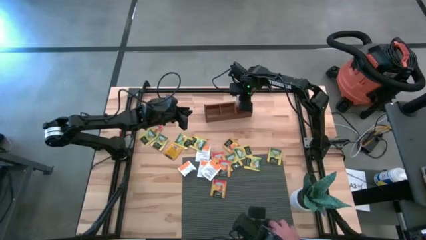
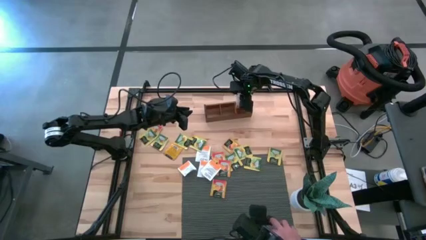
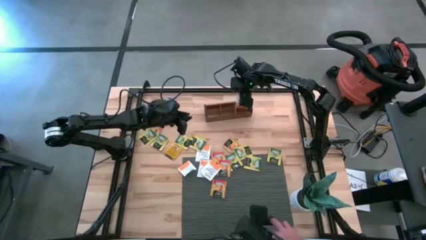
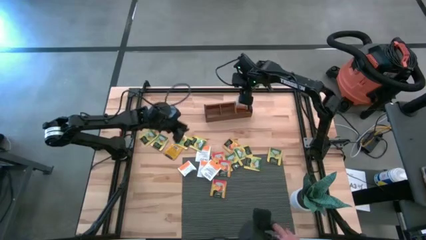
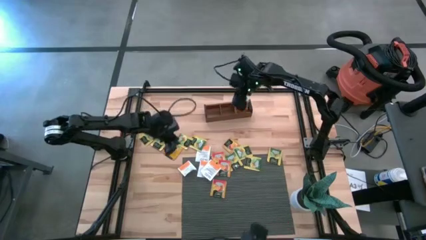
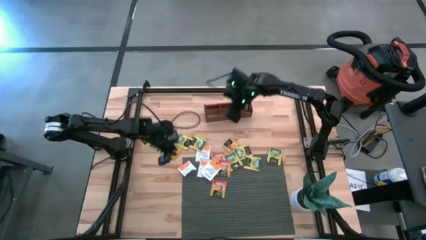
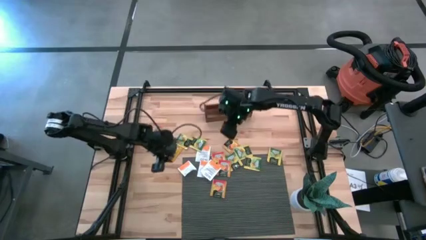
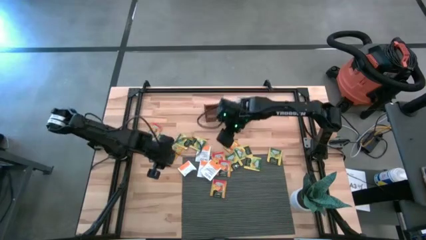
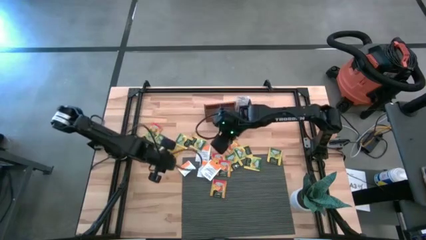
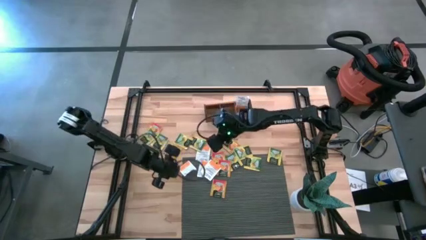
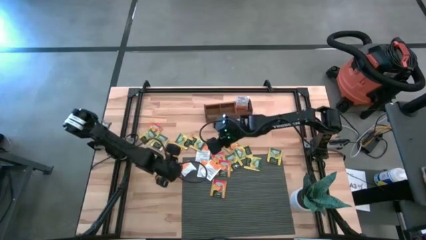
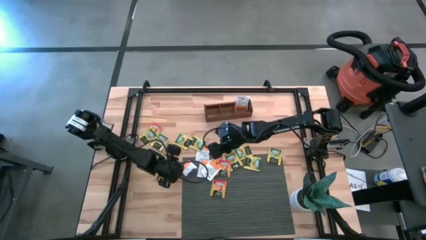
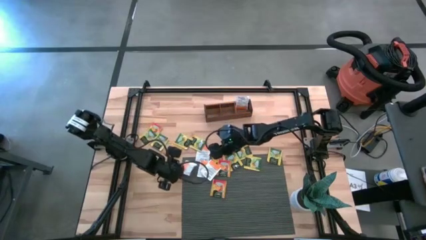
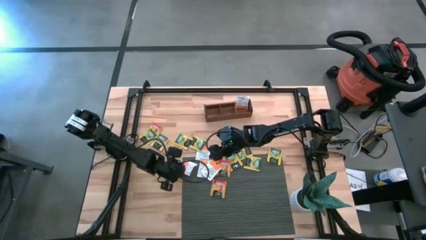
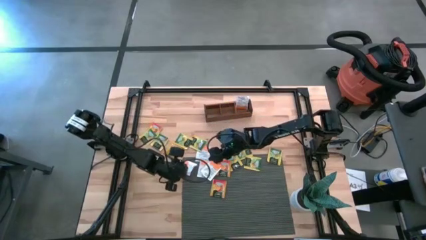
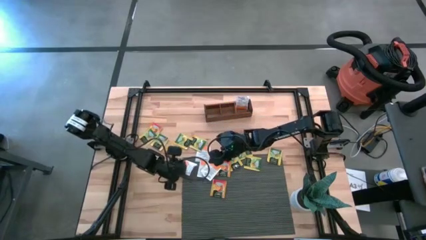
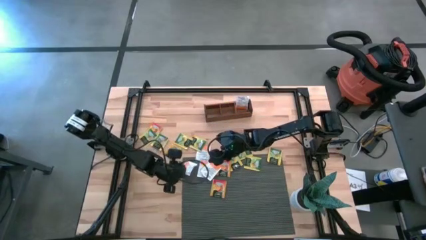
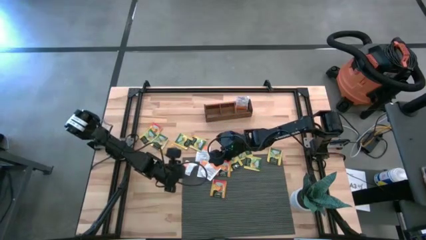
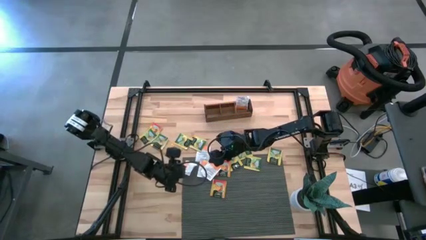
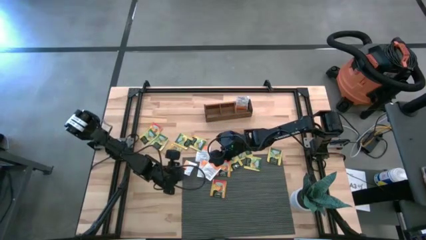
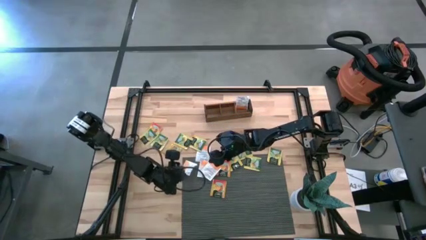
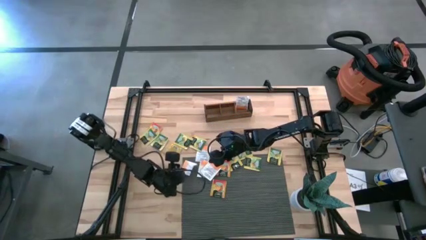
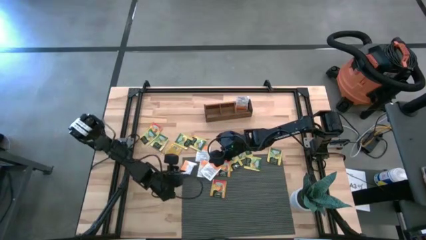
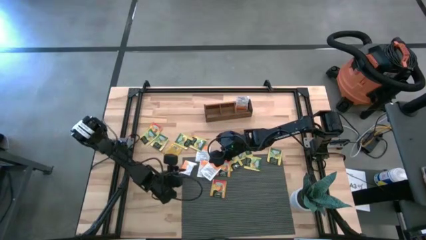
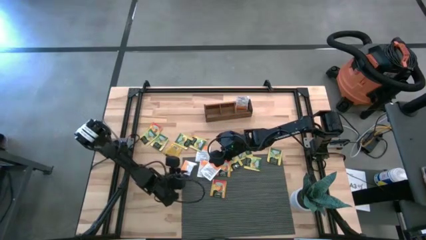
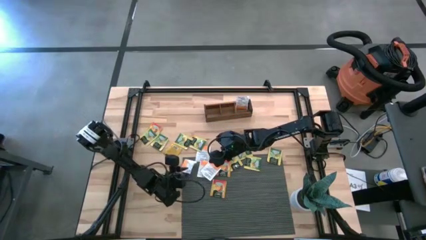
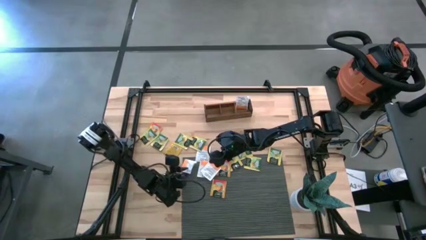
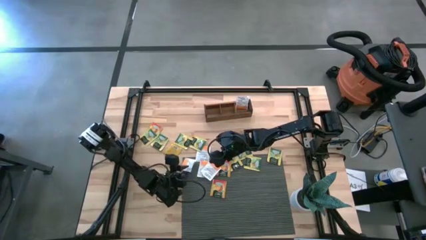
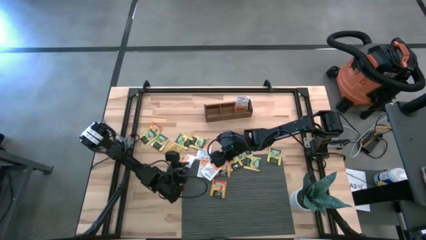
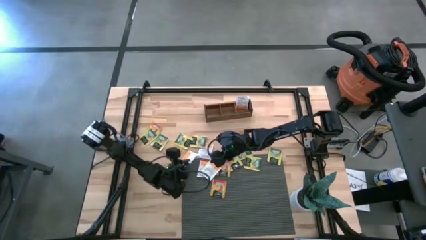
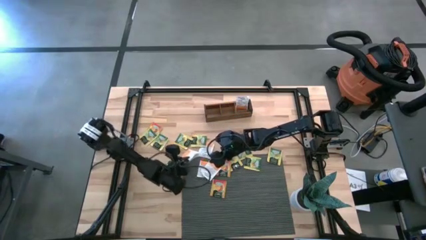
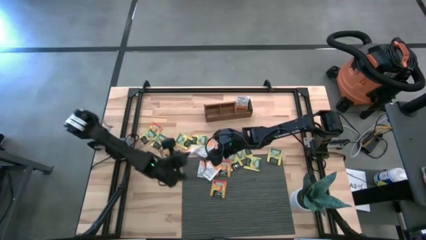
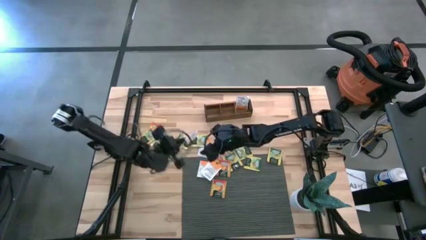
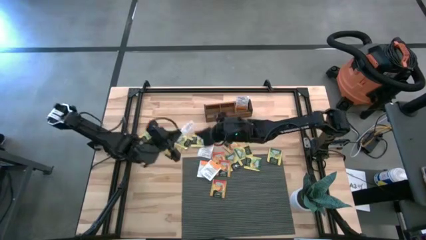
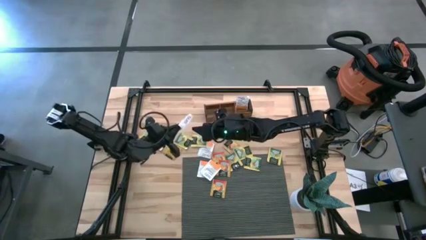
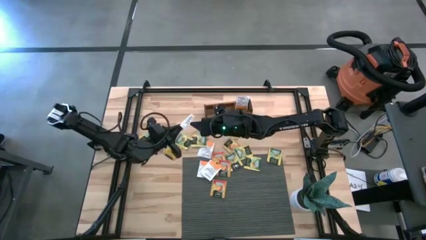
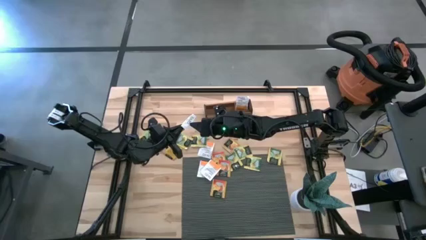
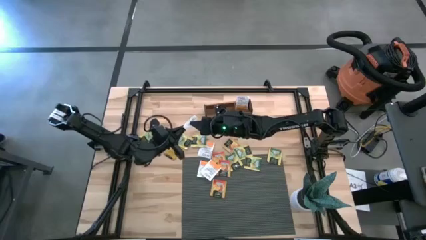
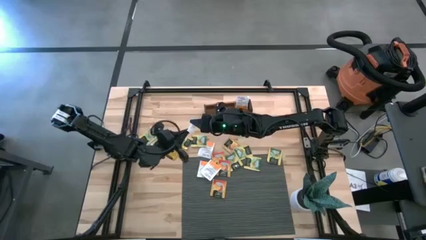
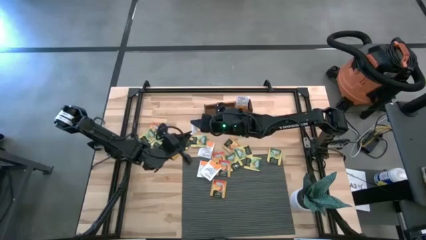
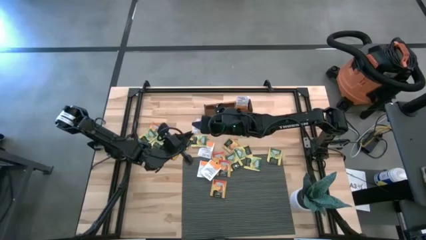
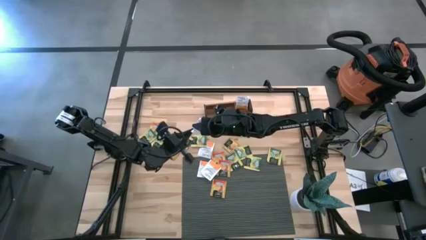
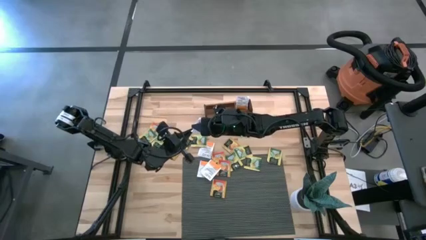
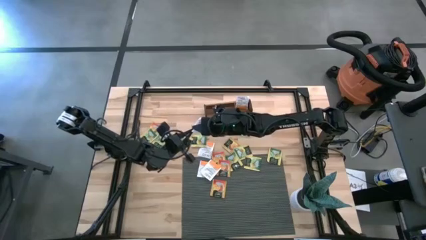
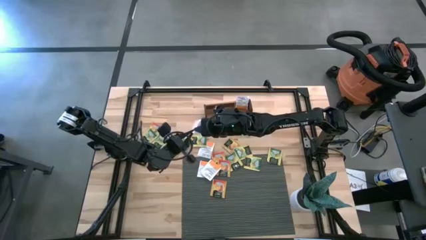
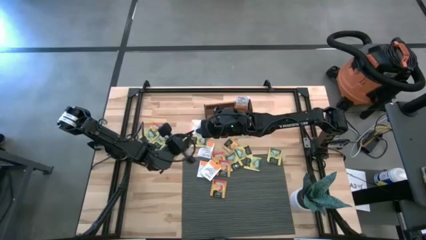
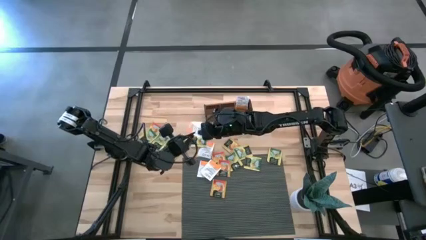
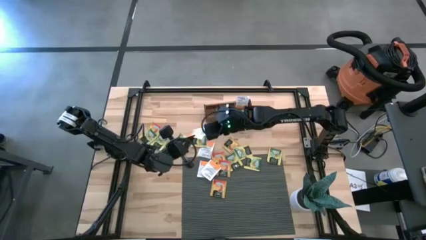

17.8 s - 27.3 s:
Task: Pick & Place Tea
Put the white tea bag into the right section of the wooden organizer

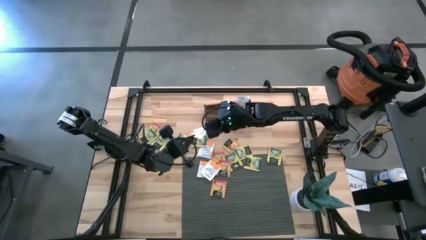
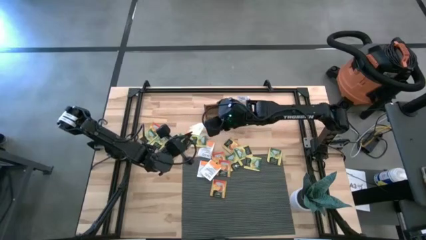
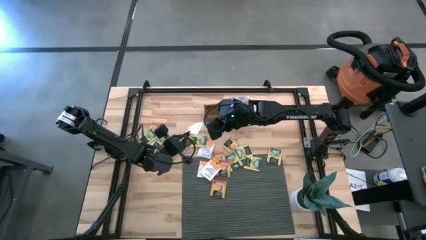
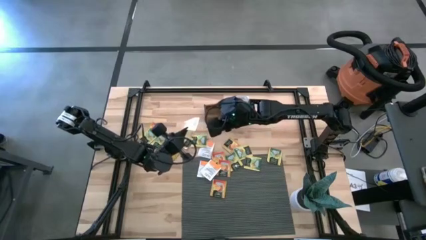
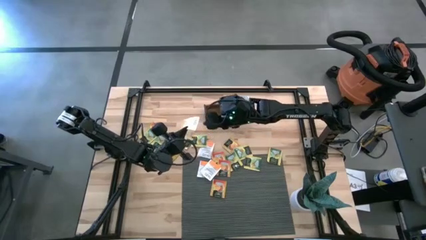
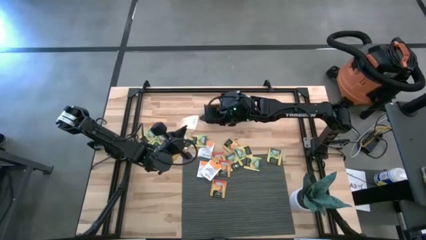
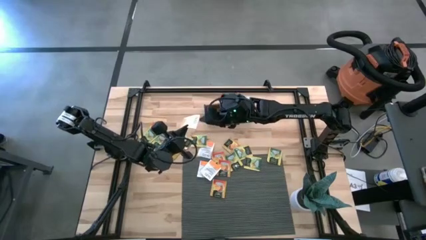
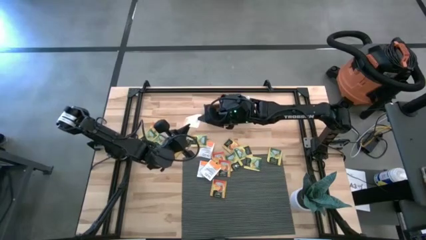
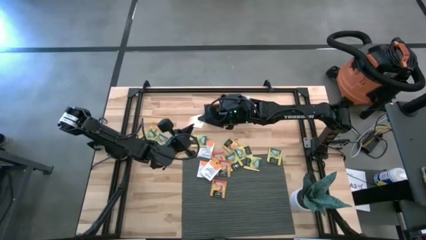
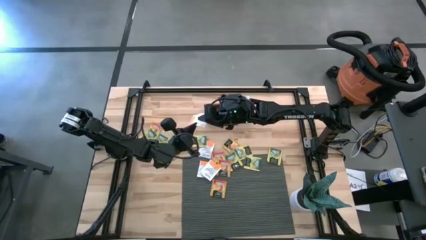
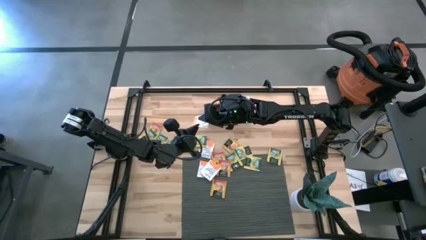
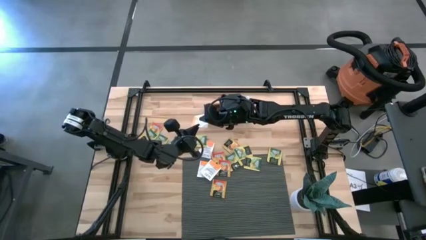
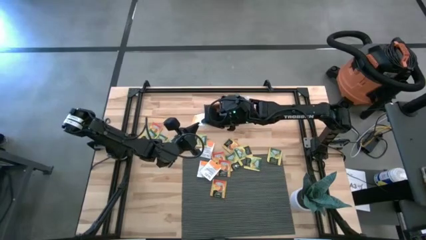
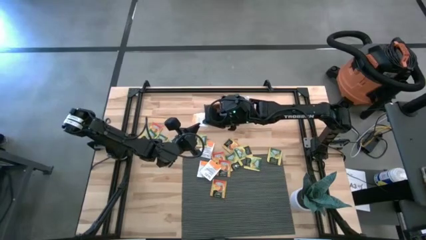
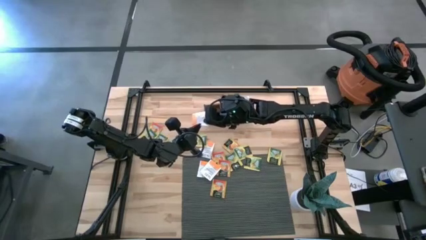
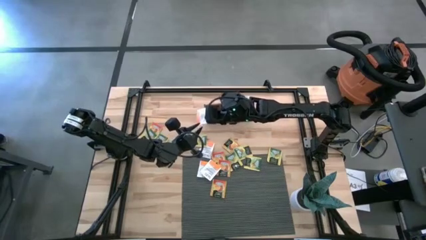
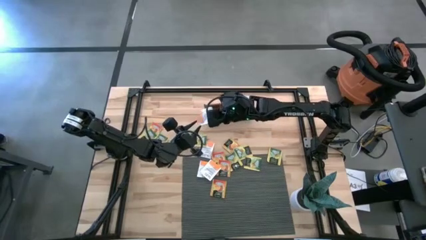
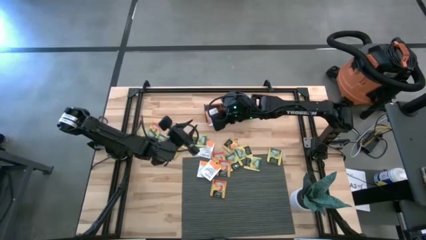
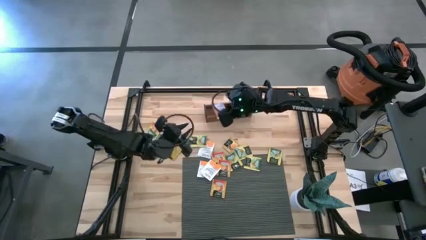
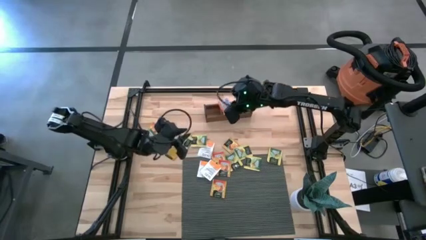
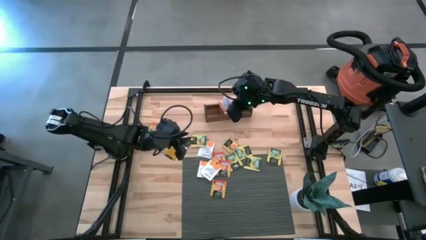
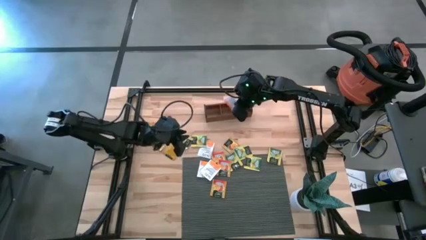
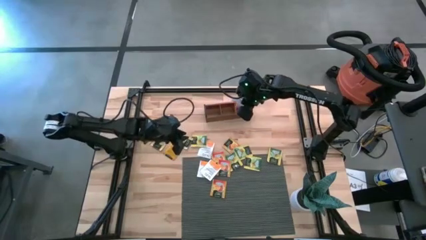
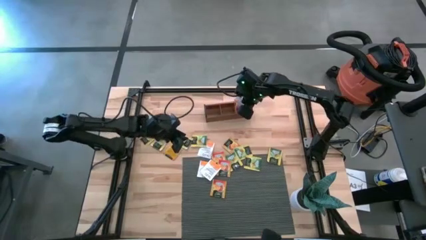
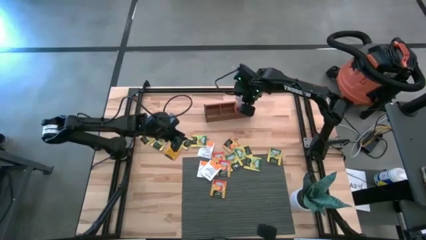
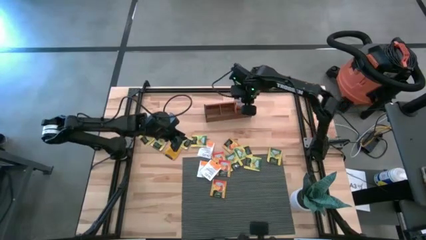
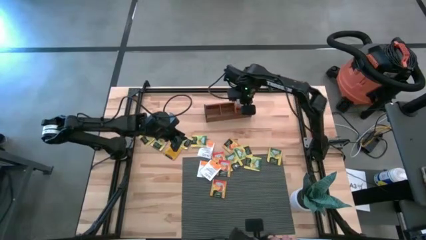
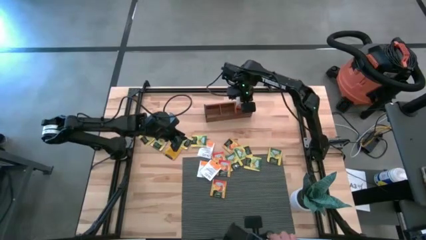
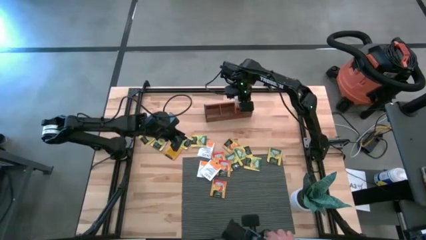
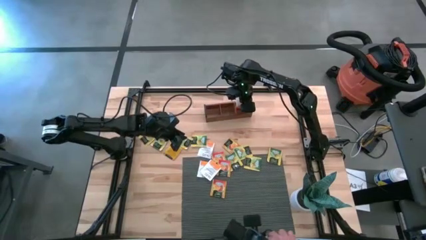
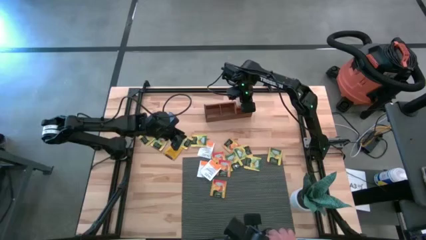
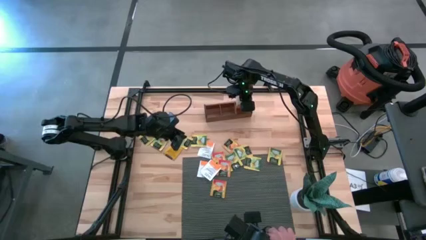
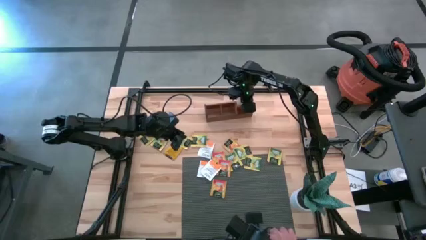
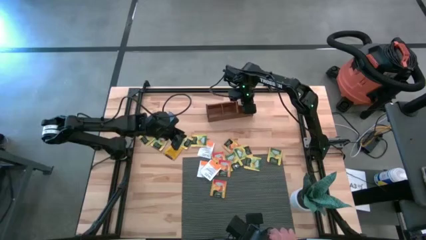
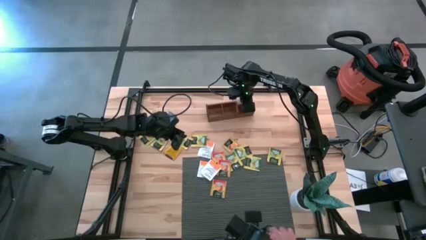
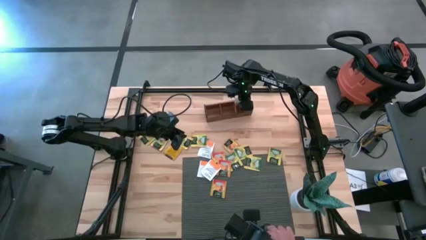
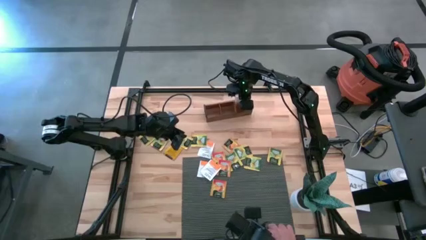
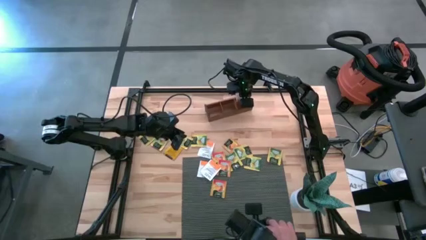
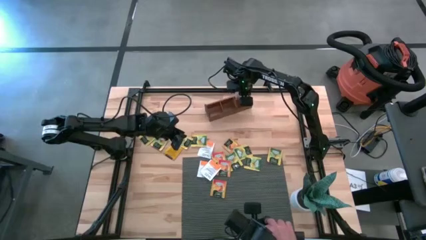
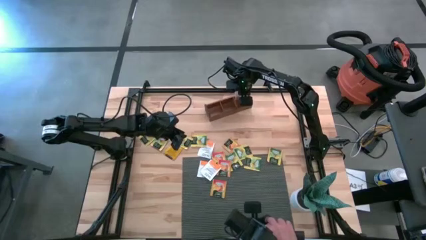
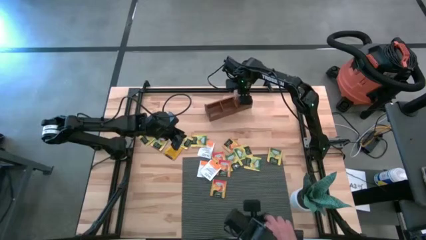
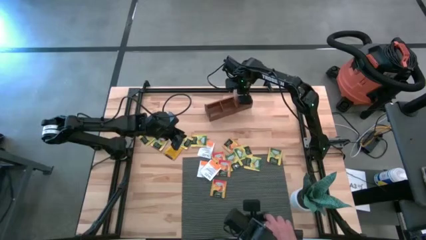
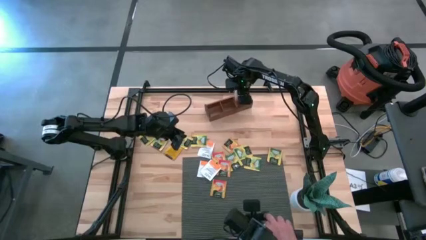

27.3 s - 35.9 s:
Put the white tea bag into the right section of the wooden organizer
